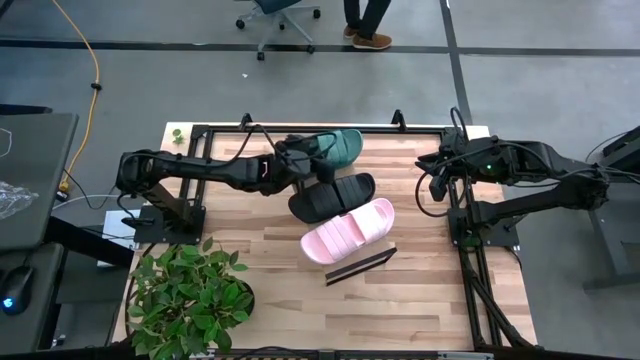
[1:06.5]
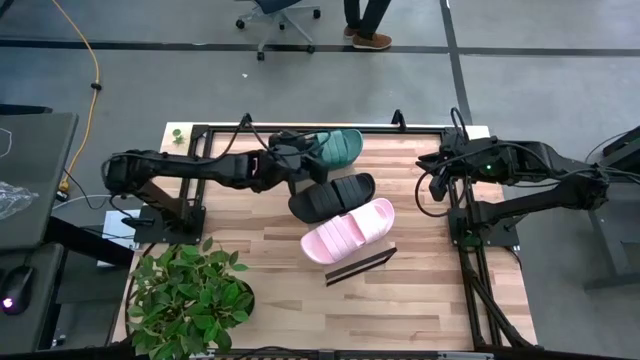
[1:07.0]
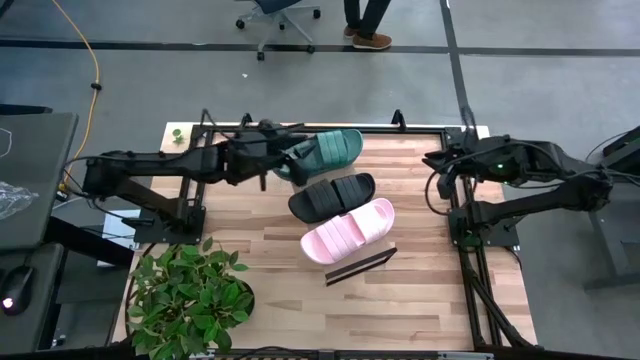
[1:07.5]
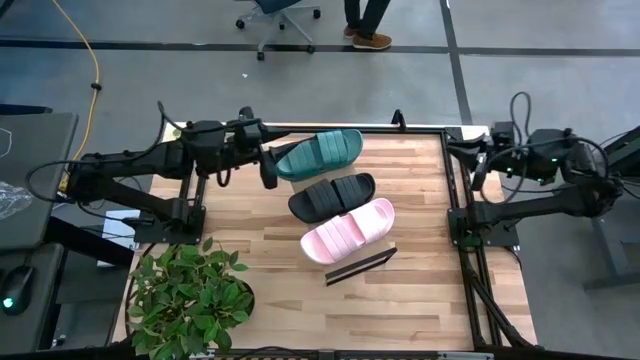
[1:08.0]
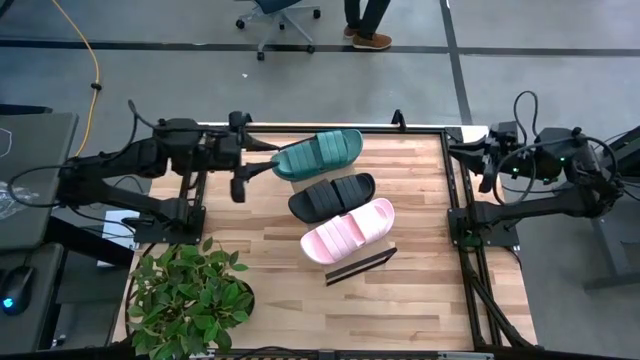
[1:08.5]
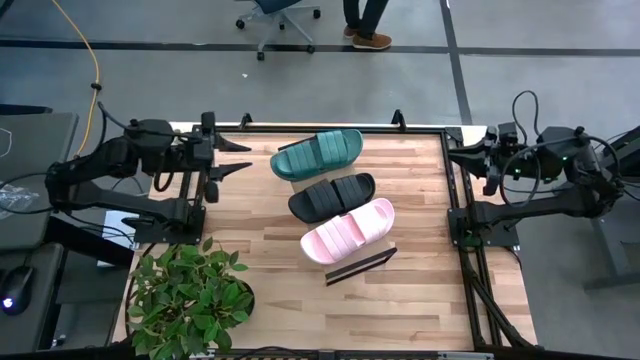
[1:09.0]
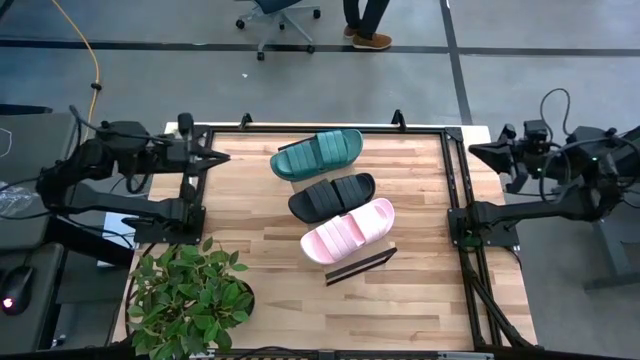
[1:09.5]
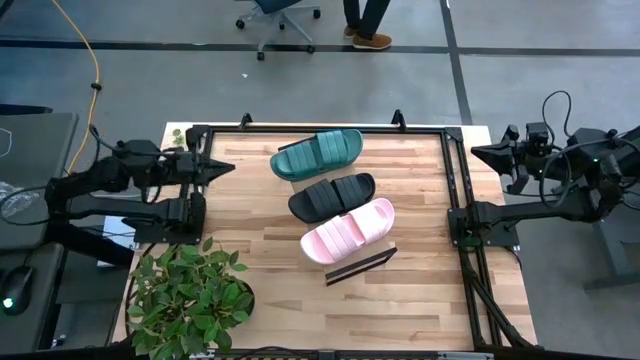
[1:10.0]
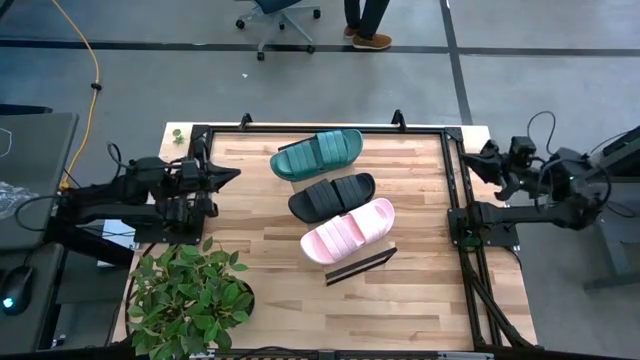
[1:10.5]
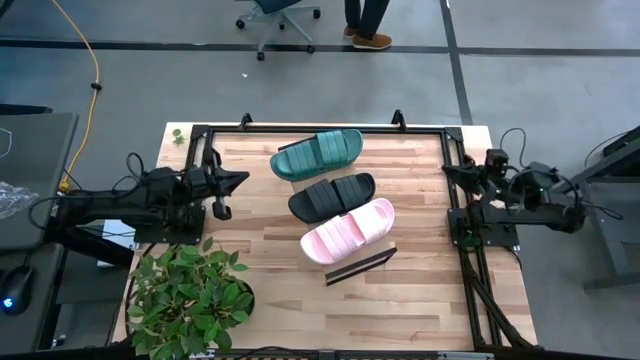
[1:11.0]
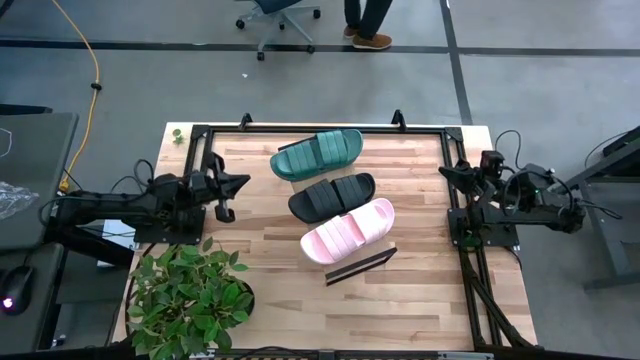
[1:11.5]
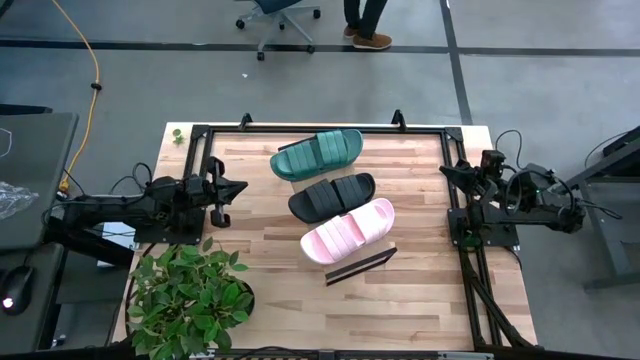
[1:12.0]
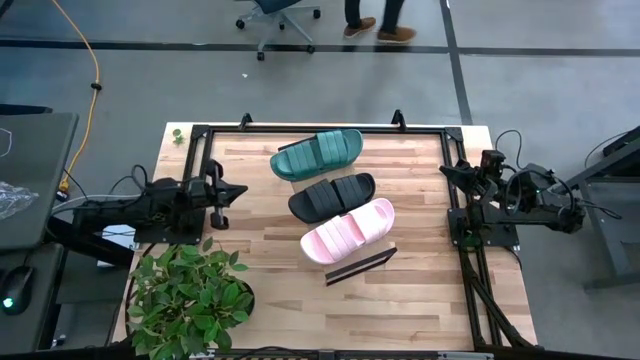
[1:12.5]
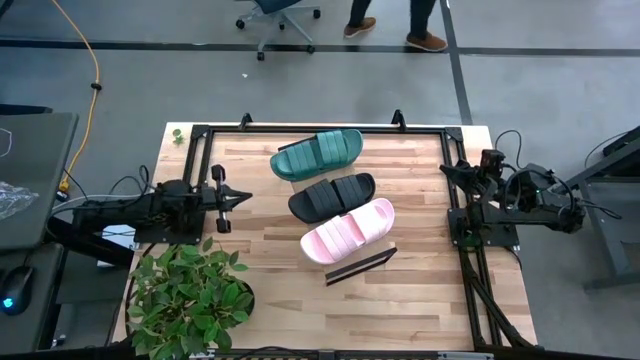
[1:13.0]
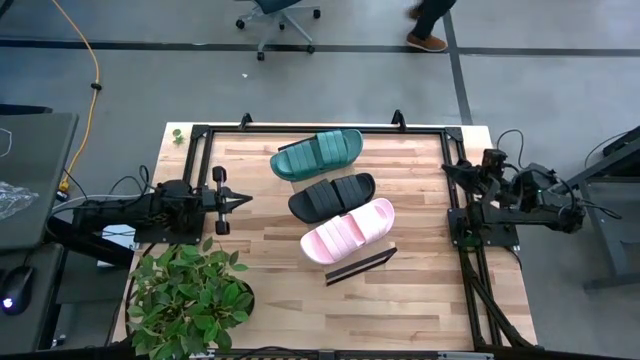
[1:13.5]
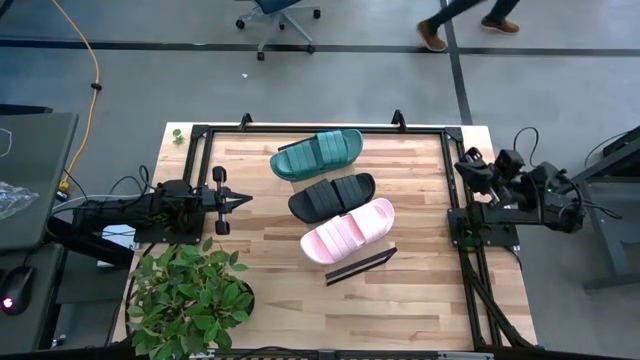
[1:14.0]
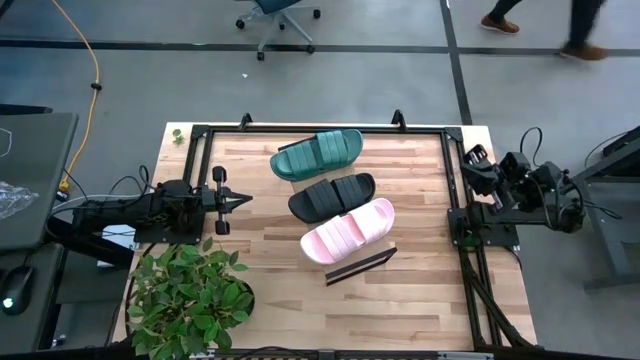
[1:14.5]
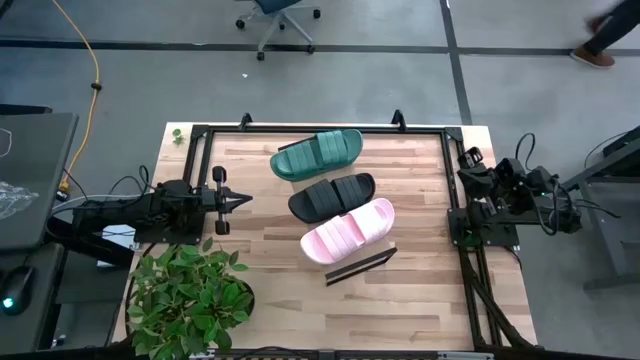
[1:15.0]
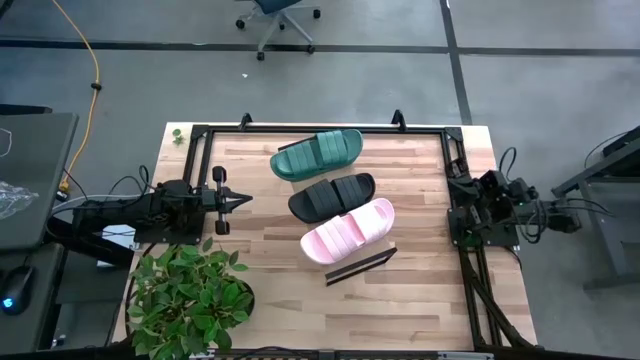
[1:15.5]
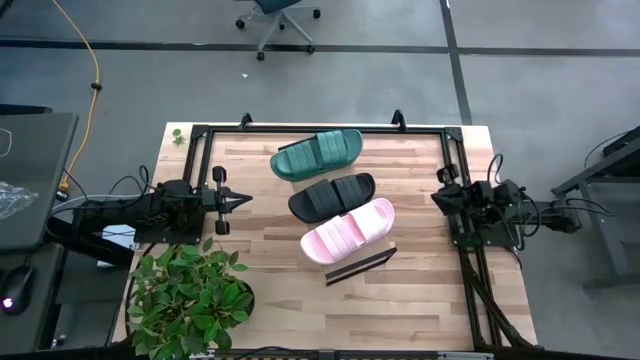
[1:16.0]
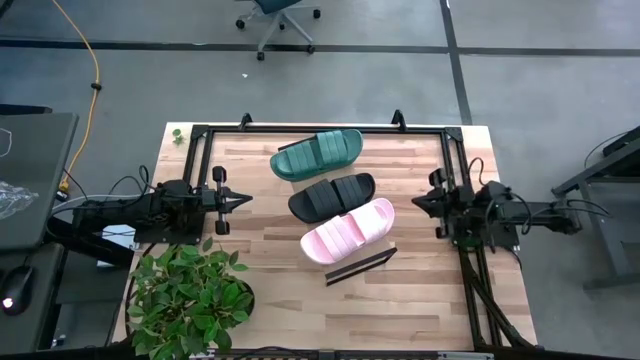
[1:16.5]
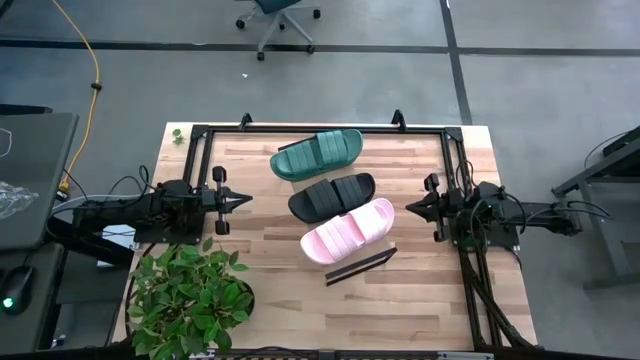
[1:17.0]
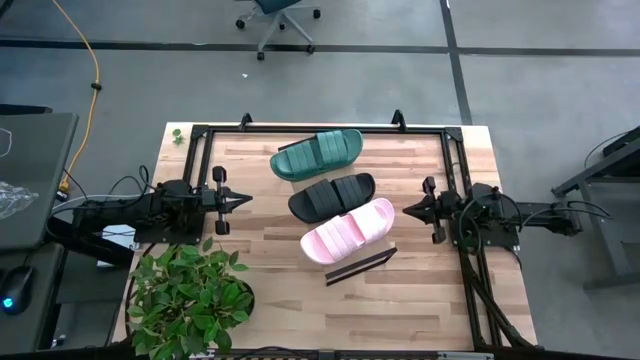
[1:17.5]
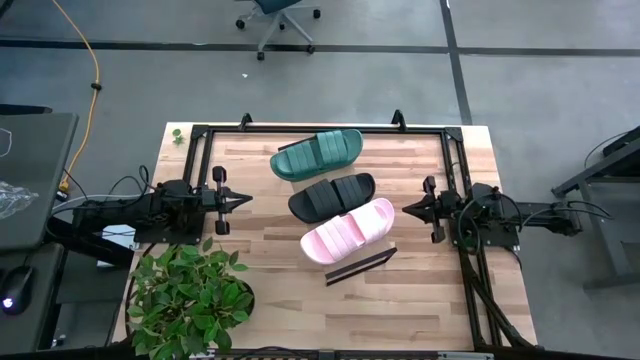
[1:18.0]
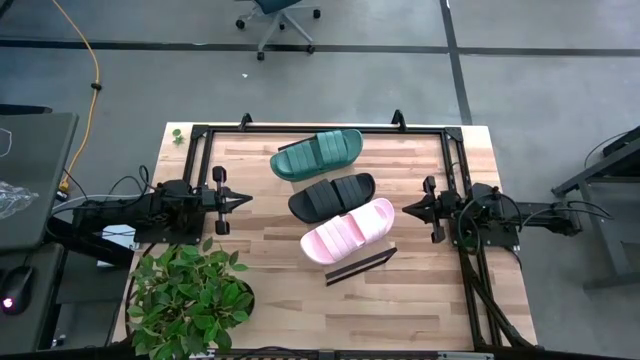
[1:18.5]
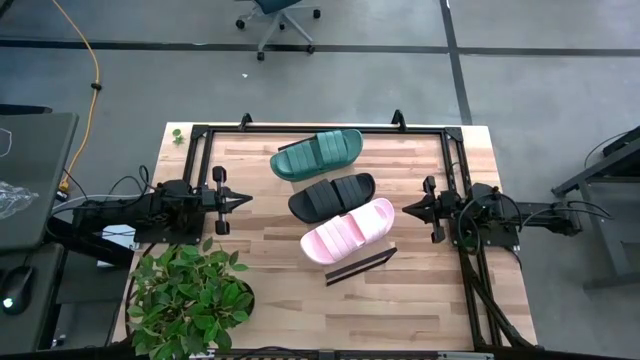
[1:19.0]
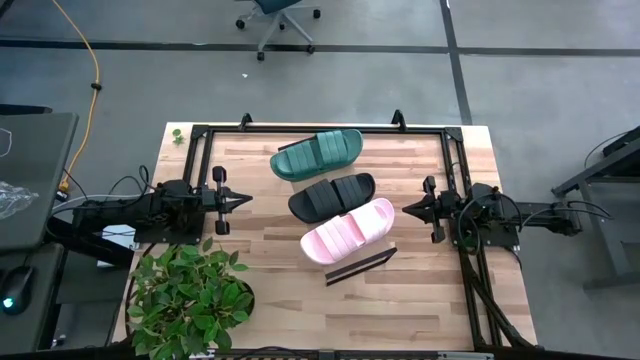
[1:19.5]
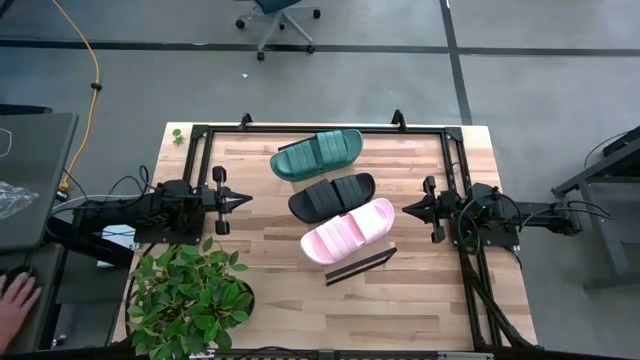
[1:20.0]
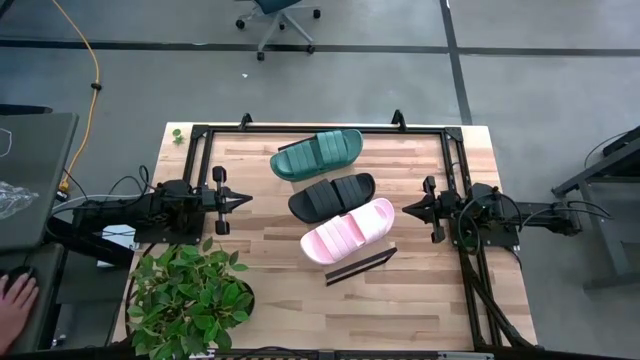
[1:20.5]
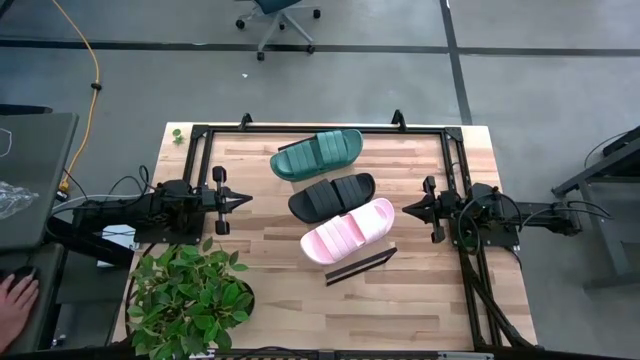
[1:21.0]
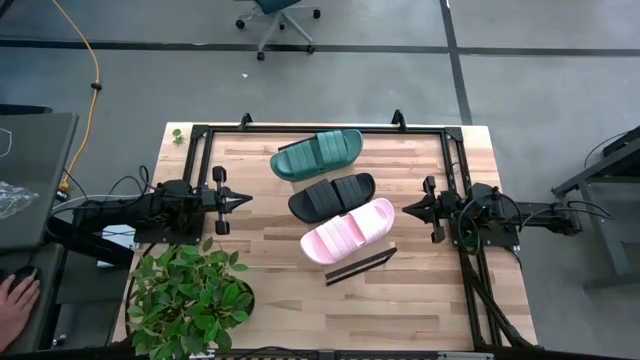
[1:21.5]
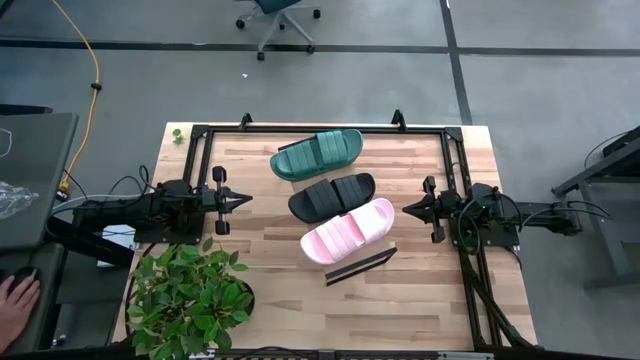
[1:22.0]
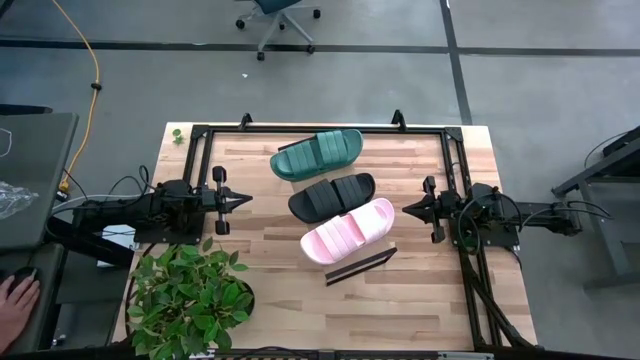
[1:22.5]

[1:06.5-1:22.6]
Task: Pick and place slides into the shelf
Return to Home Position

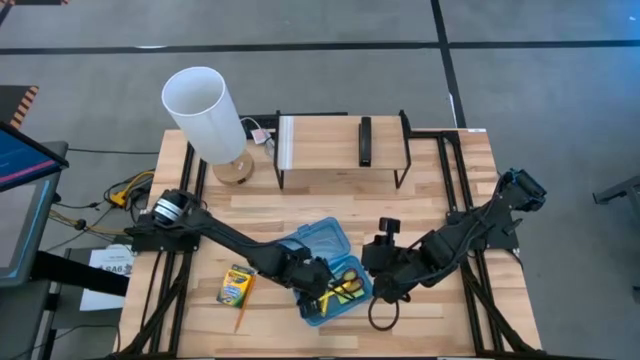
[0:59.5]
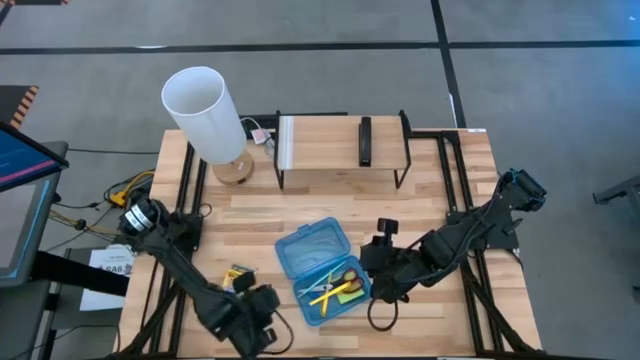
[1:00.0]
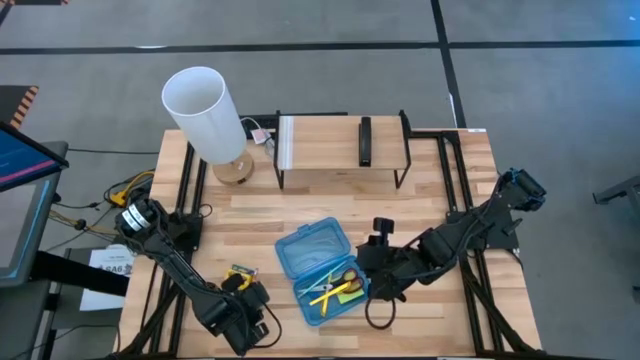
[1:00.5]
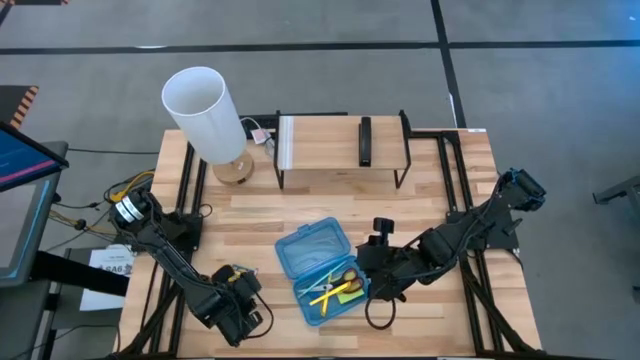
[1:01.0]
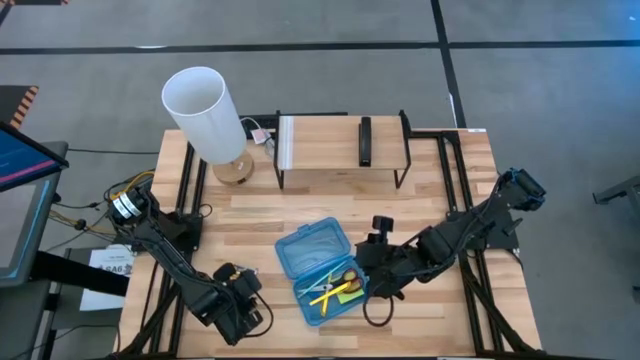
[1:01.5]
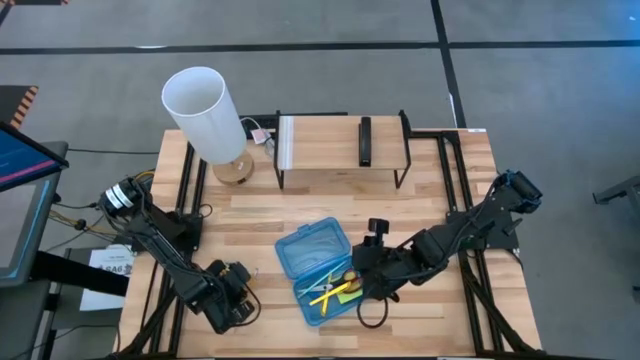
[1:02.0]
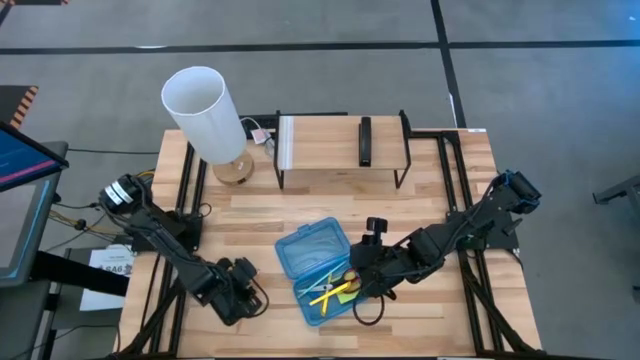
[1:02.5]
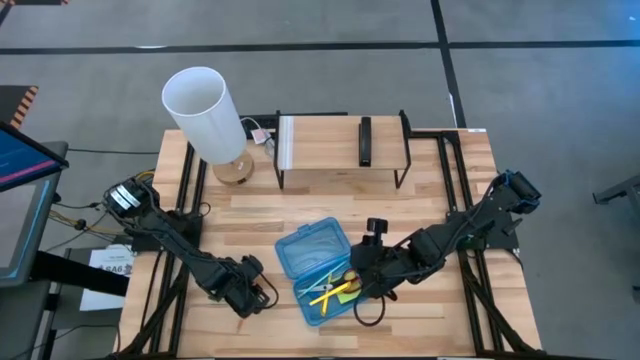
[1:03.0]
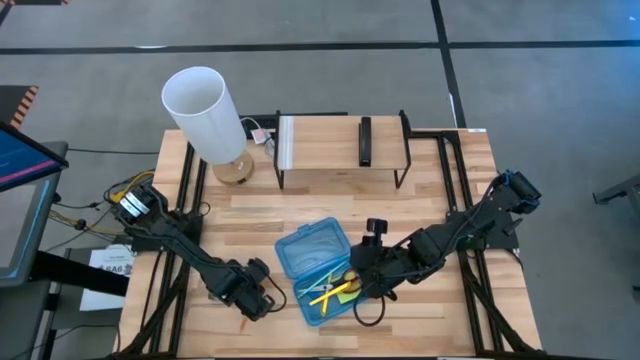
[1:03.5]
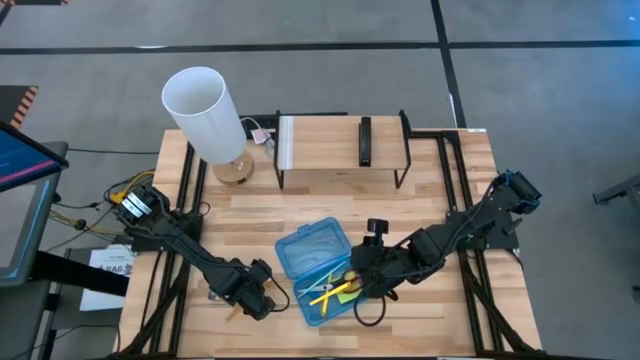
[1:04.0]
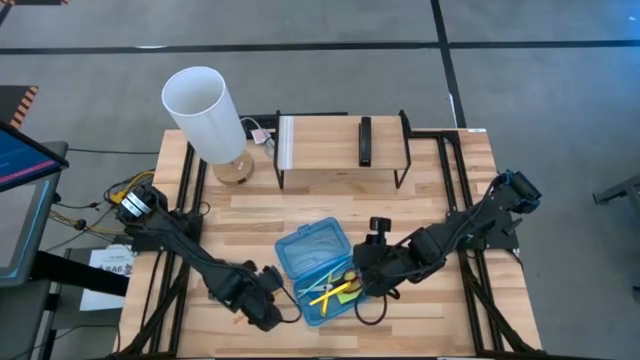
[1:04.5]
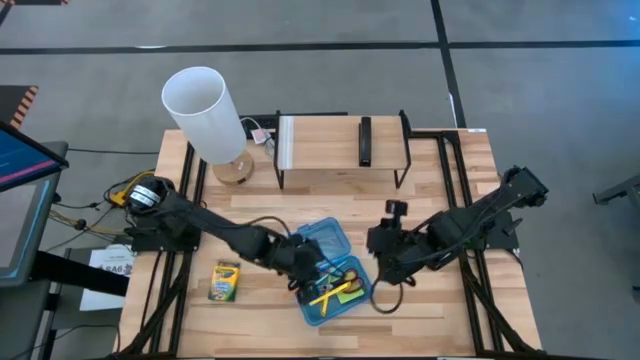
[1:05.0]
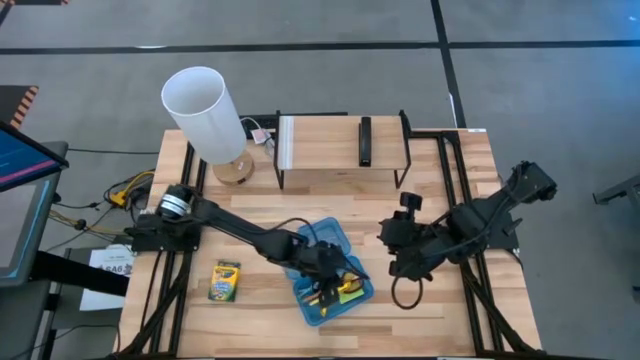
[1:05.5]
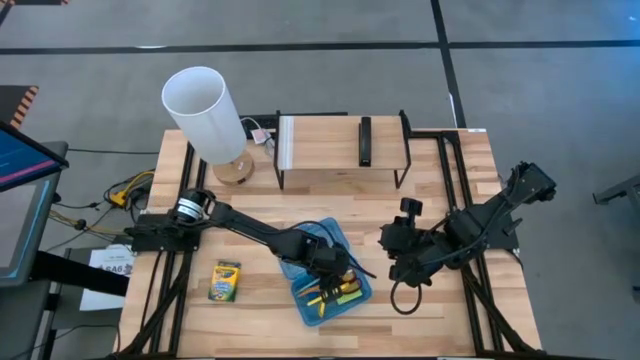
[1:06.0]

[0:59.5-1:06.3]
Task: Pack school essentials
Put the yellow pencil into the blue supply box
